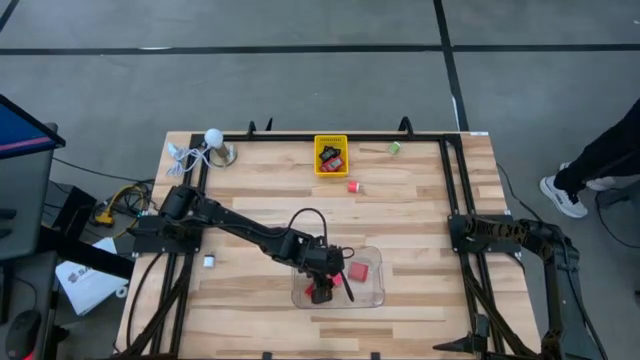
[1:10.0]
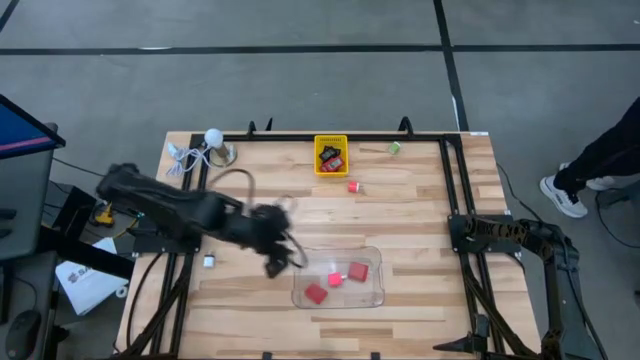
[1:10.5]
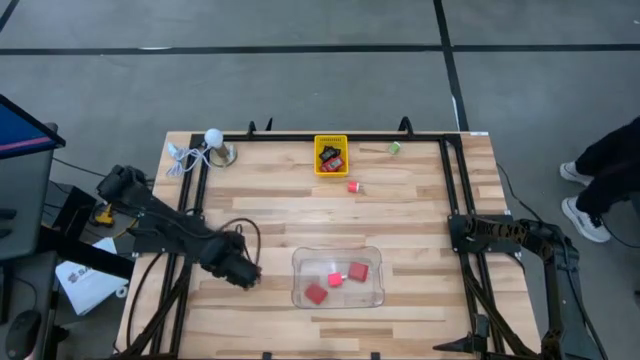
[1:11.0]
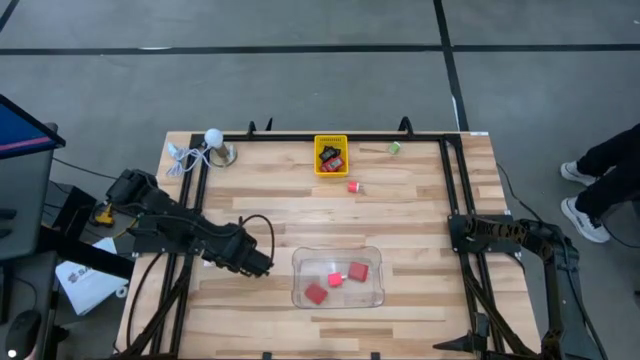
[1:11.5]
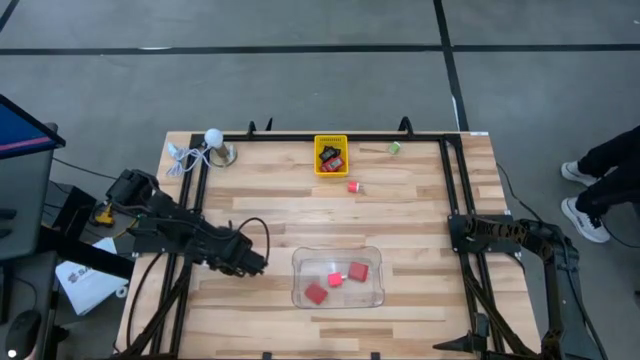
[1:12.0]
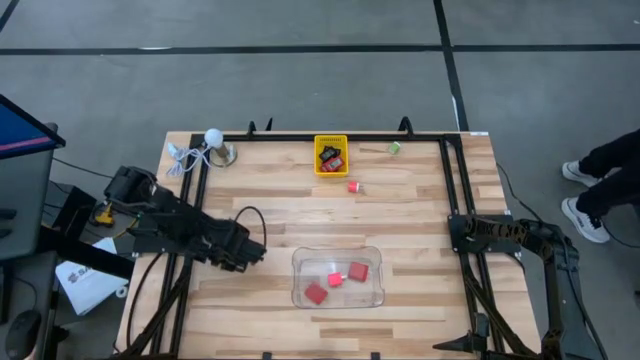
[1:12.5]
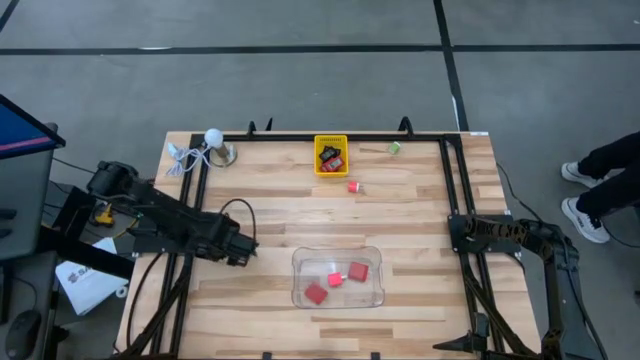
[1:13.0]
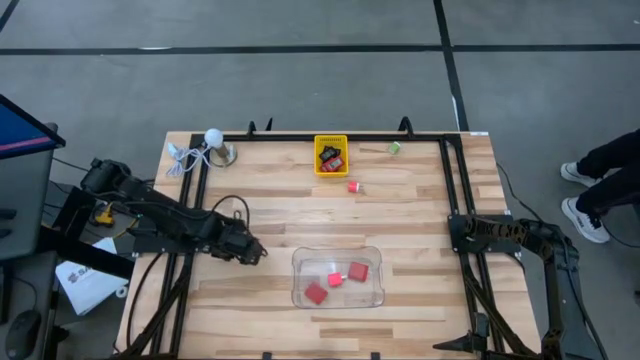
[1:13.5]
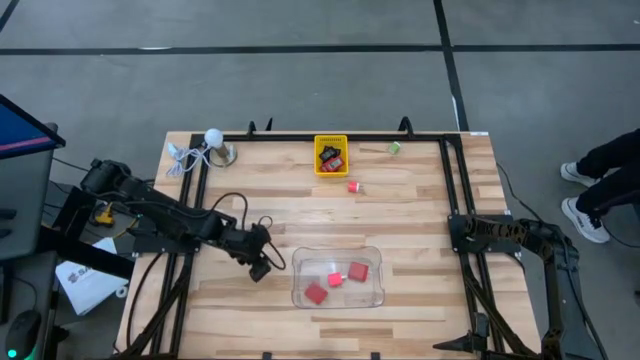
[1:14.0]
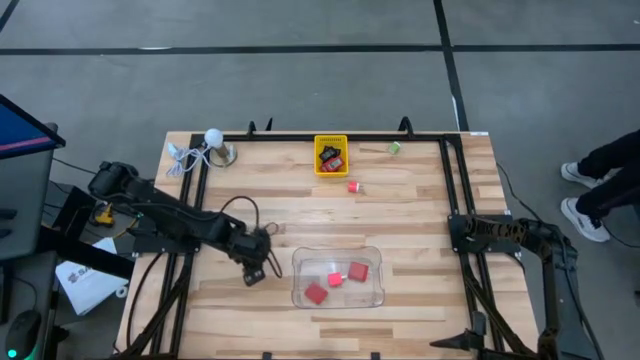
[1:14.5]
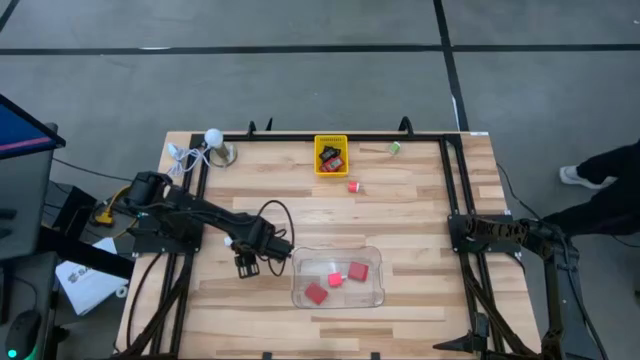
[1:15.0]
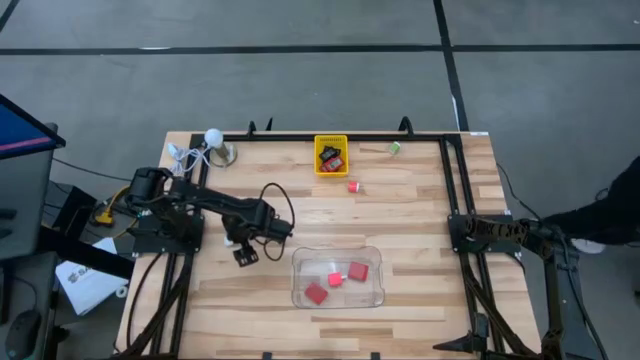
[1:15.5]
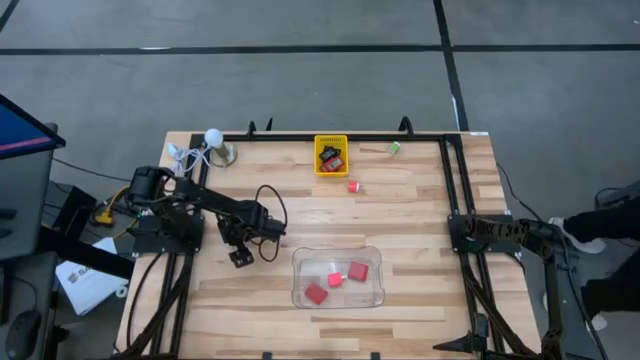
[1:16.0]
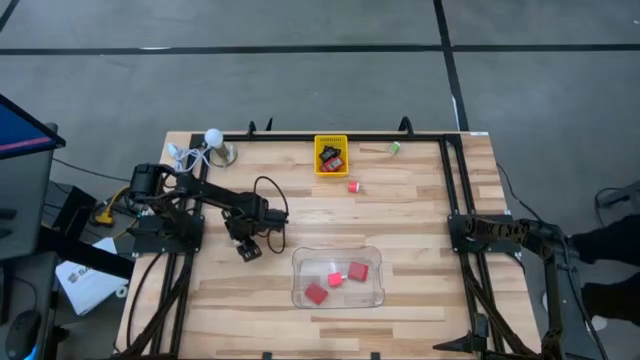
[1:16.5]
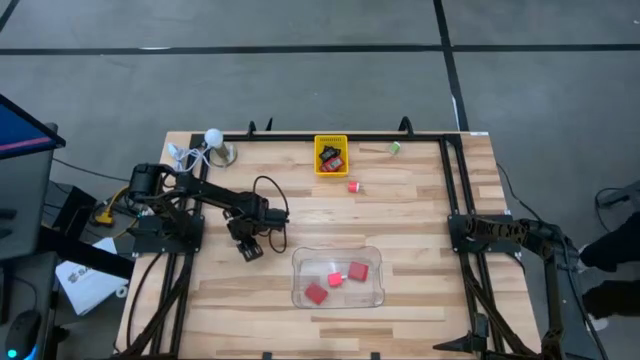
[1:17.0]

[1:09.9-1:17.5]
Task: Pick & Place Office items
Put the white charger adapter into the transparent bin

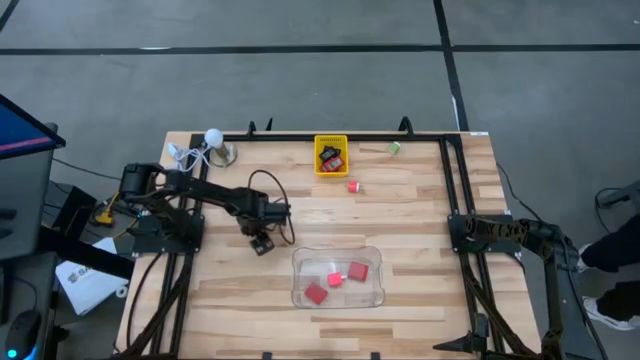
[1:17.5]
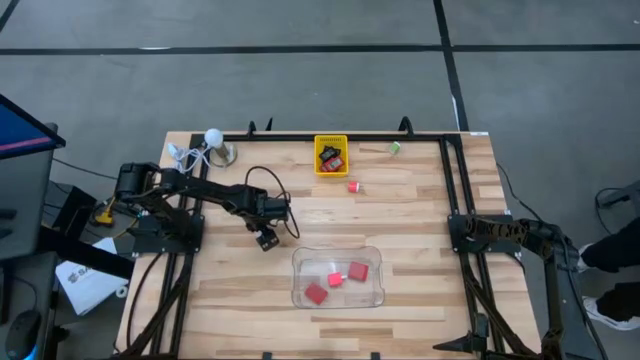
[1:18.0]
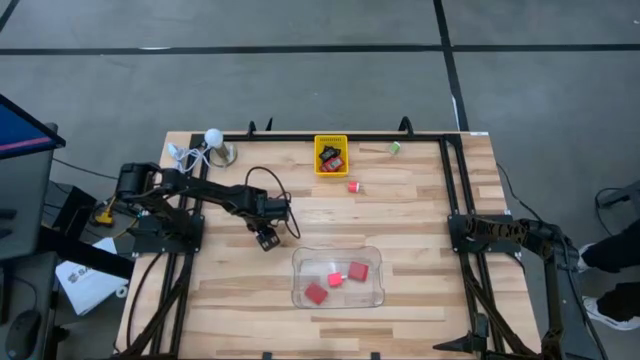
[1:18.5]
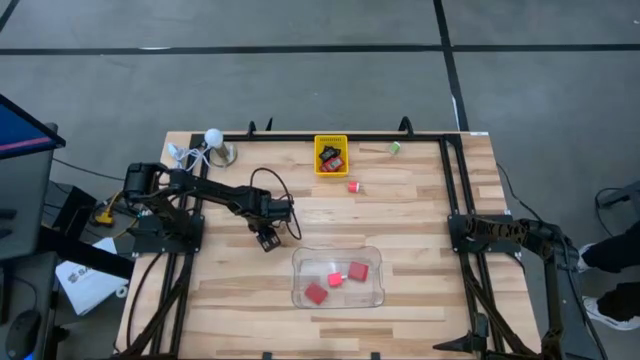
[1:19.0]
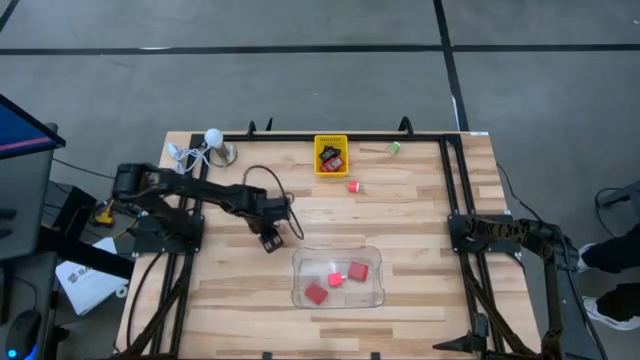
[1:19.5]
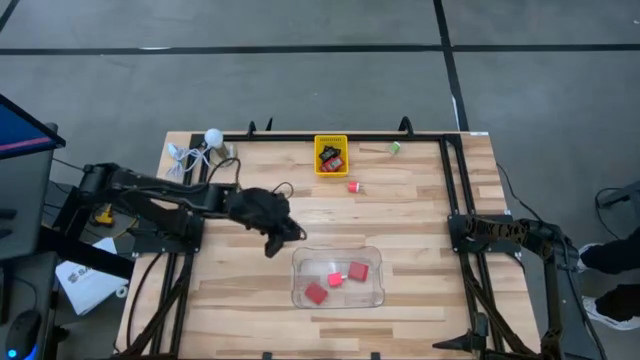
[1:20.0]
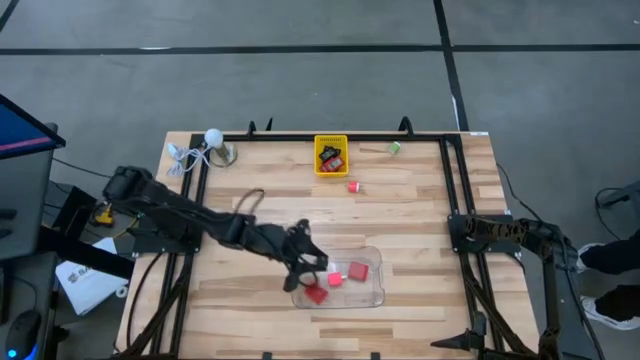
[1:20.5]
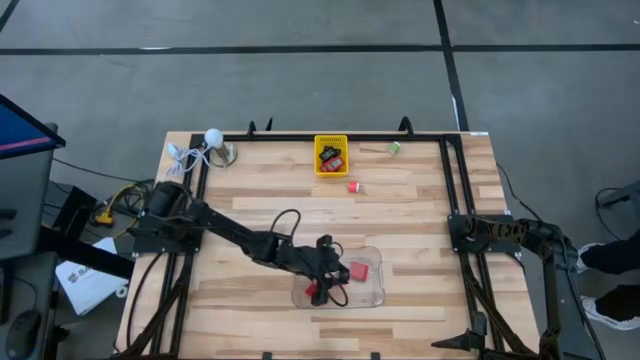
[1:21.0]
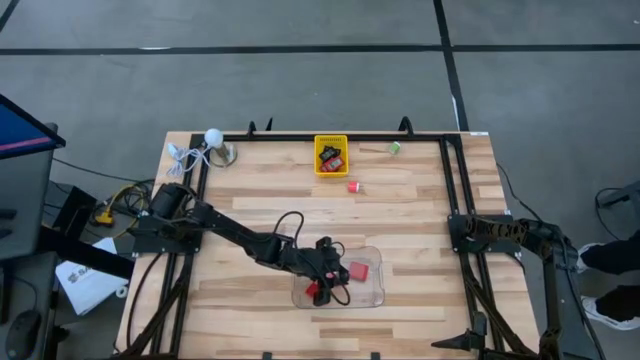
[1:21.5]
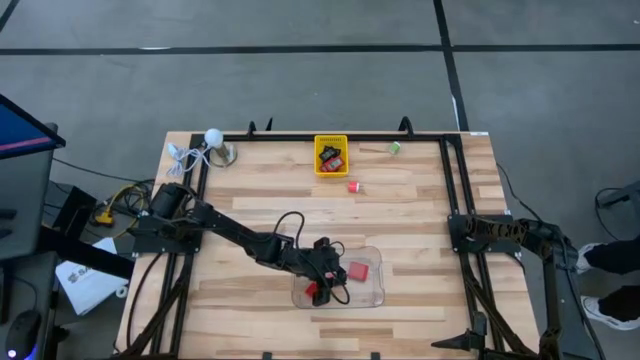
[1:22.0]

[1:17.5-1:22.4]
Put the white charger adapter into the transparent bin

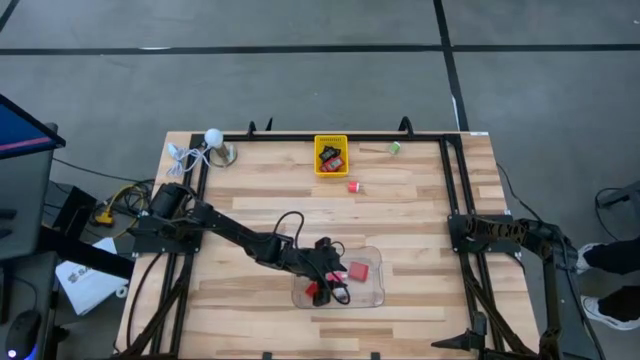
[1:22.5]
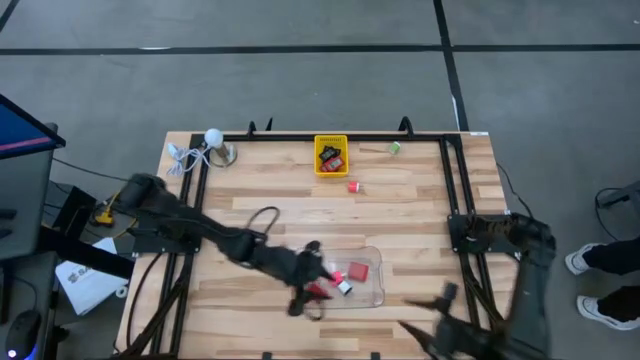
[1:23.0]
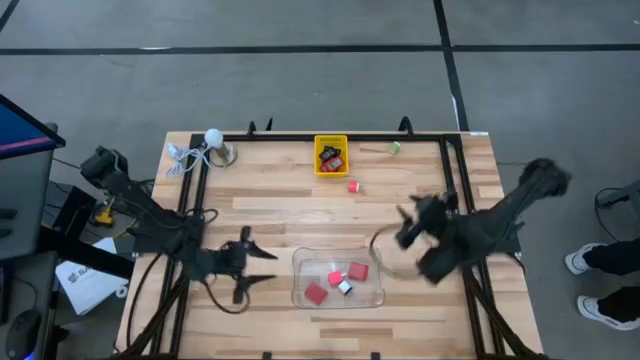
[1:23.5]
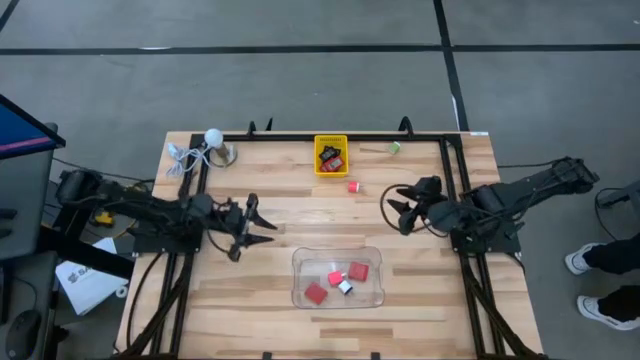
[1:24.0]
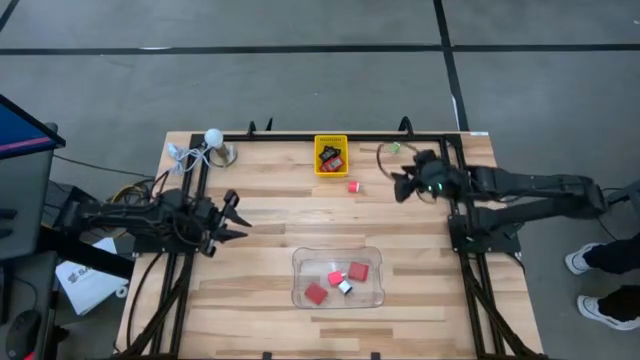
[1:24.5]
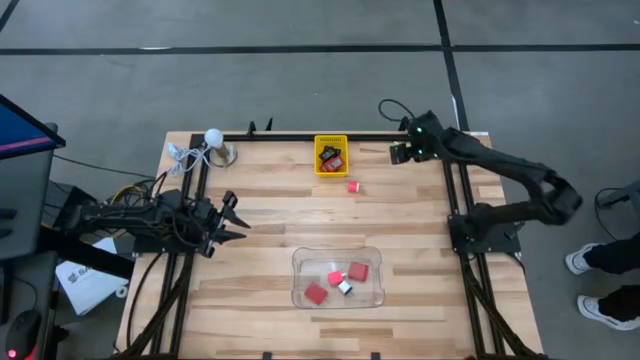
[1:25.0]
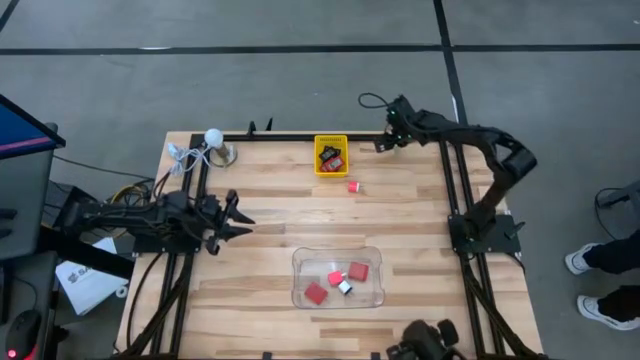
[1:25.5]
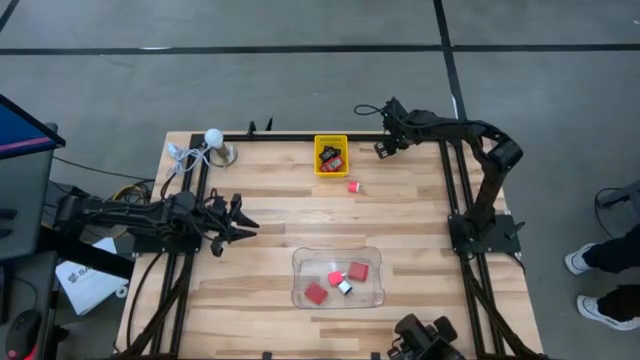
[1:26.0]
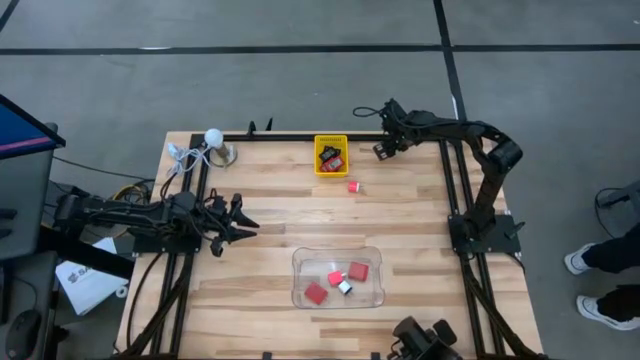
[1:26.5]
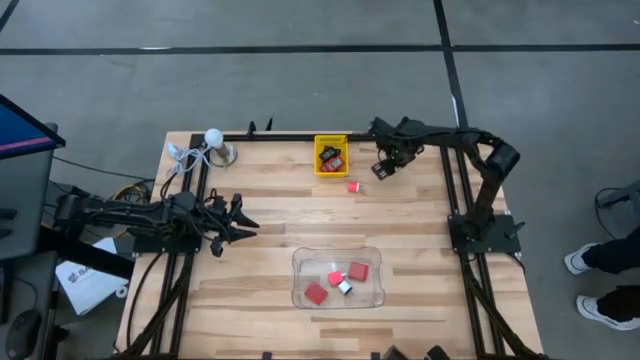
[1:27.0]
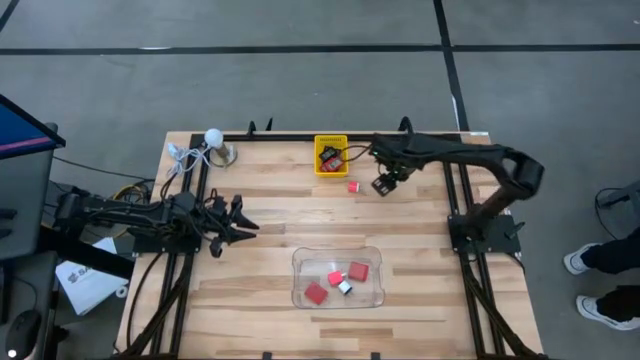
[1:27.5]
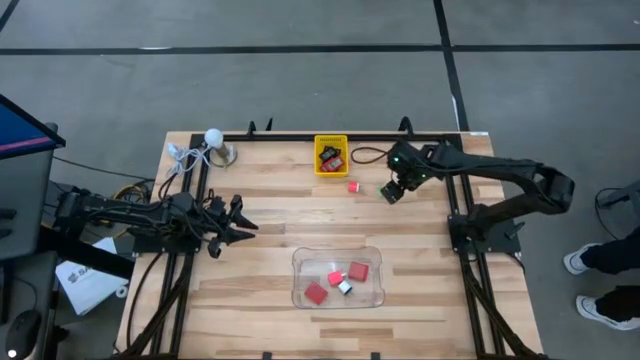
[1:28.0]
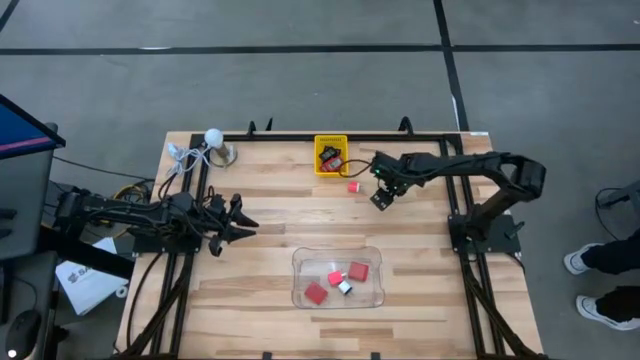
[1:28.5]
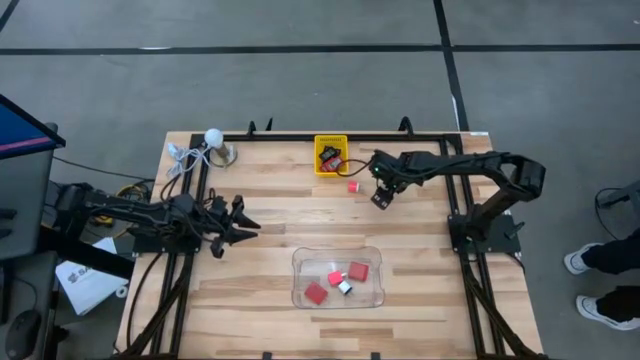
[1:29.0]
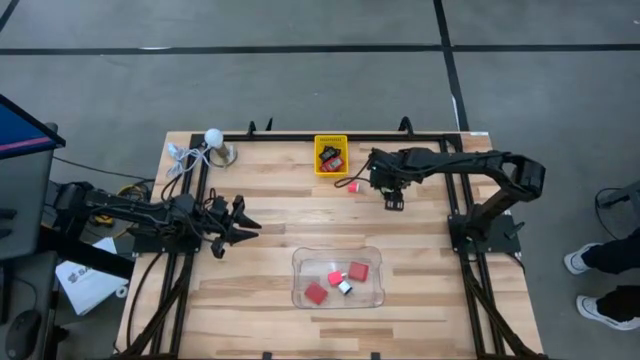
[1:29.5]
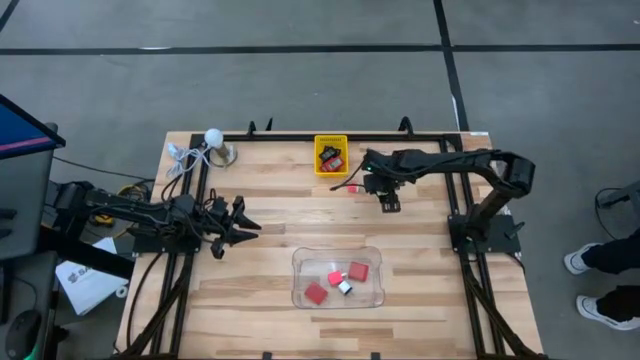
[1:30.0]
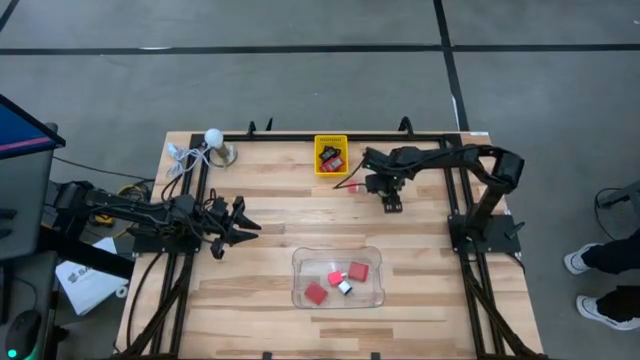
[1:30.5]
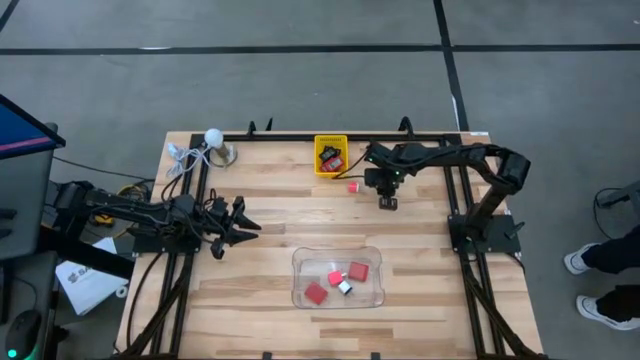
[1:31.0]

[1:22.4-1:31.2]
Put the green charger adapter into the transparent bin
